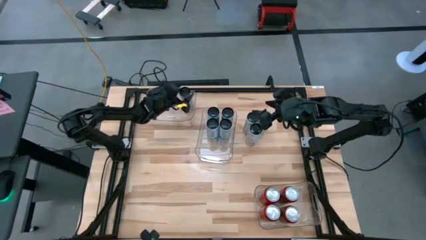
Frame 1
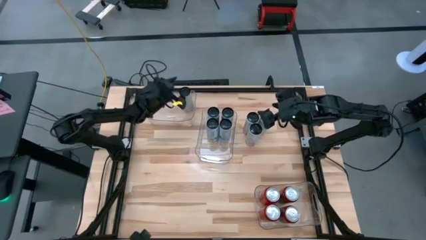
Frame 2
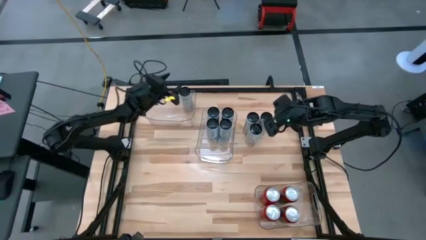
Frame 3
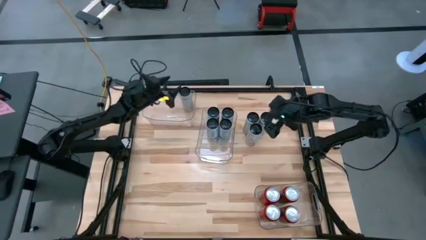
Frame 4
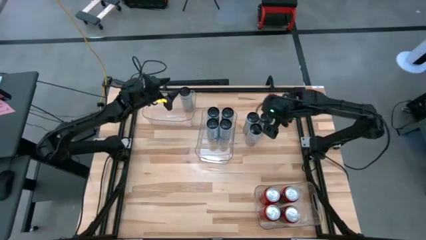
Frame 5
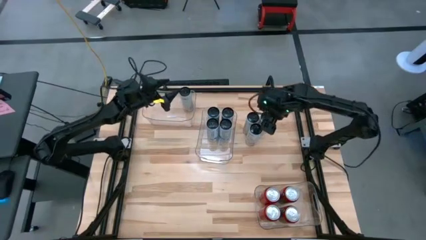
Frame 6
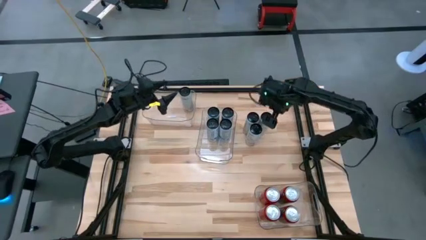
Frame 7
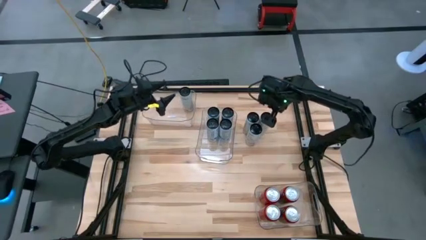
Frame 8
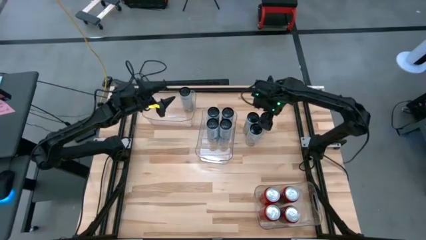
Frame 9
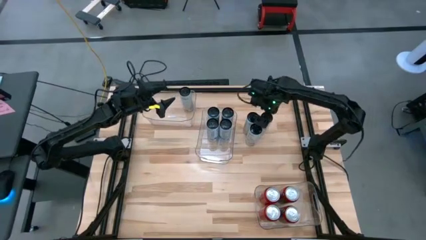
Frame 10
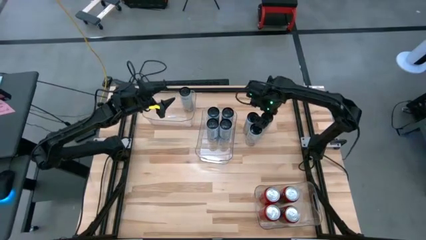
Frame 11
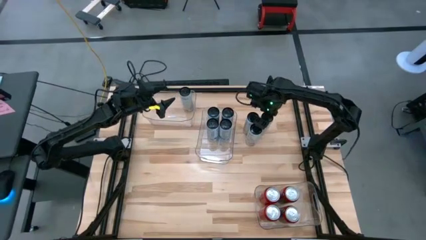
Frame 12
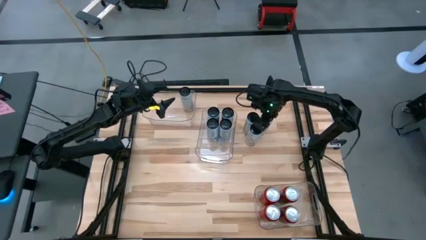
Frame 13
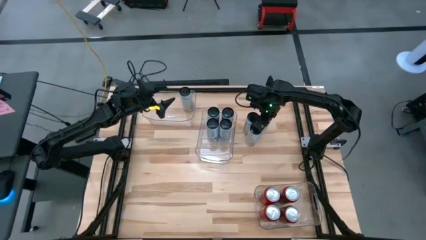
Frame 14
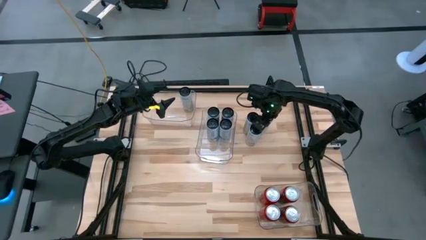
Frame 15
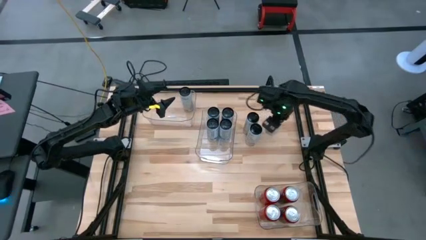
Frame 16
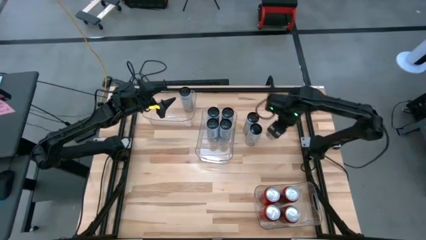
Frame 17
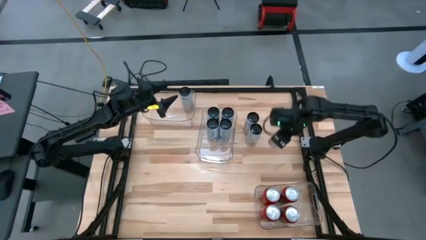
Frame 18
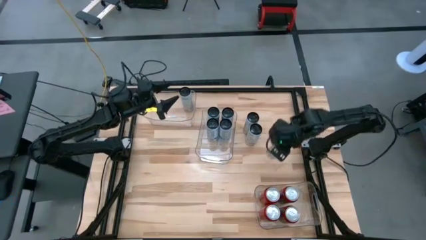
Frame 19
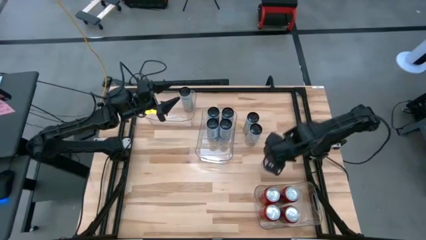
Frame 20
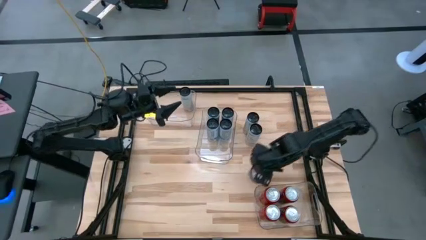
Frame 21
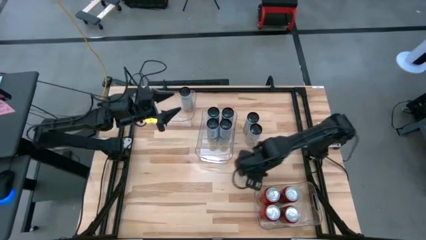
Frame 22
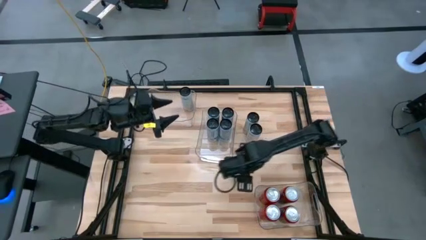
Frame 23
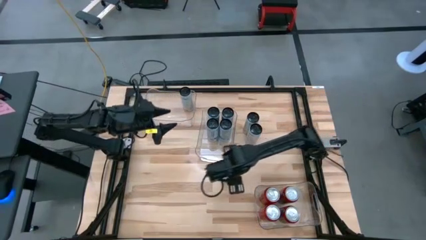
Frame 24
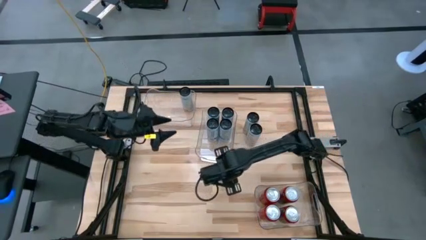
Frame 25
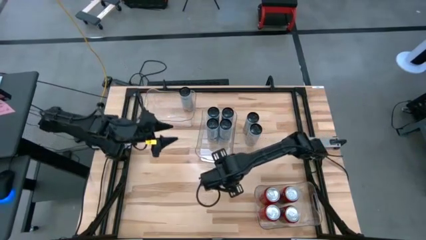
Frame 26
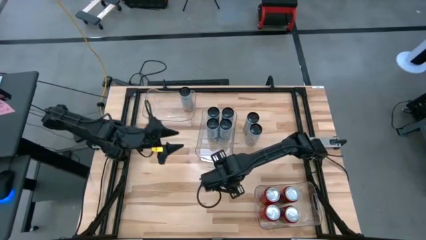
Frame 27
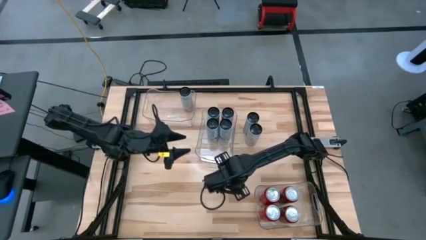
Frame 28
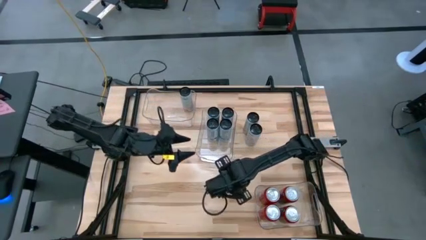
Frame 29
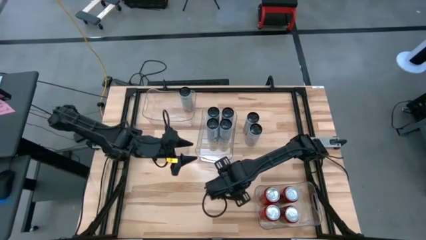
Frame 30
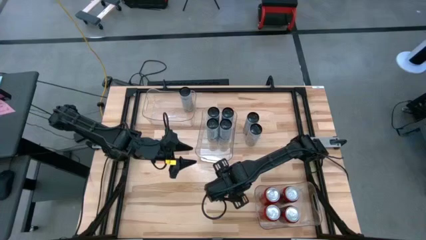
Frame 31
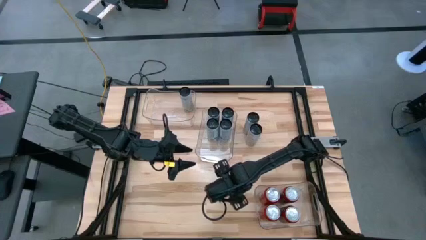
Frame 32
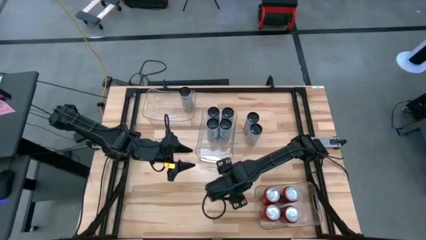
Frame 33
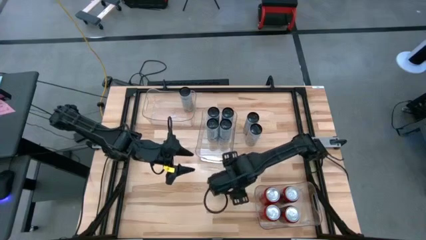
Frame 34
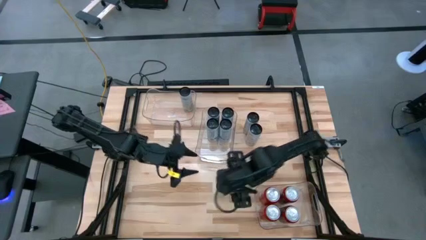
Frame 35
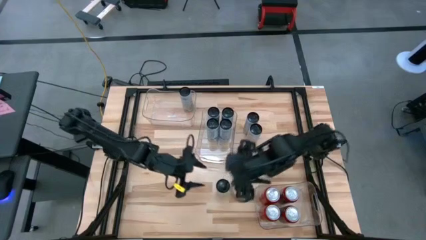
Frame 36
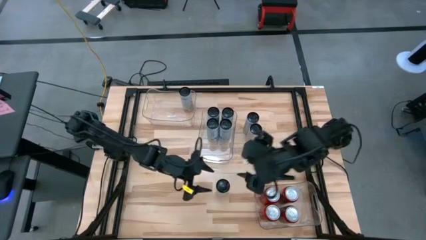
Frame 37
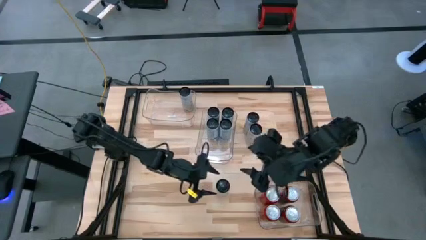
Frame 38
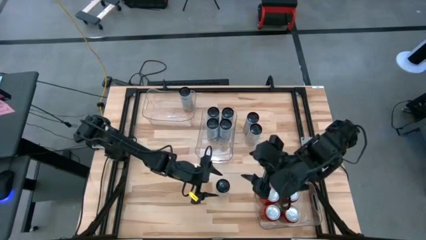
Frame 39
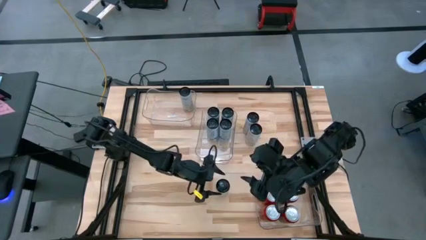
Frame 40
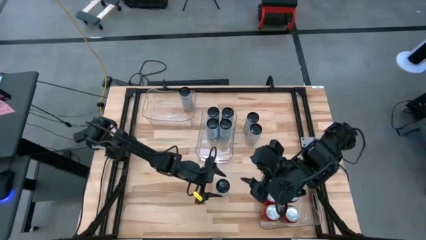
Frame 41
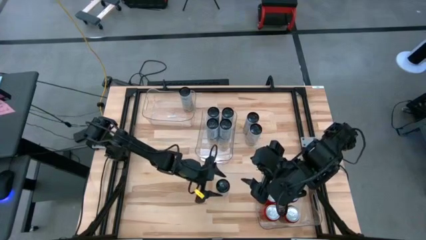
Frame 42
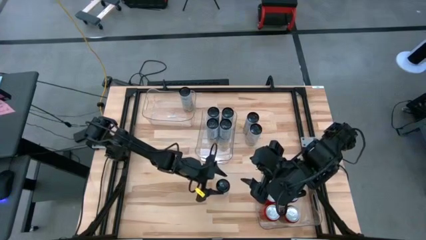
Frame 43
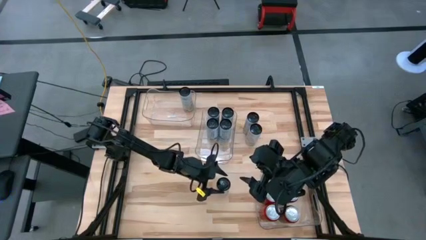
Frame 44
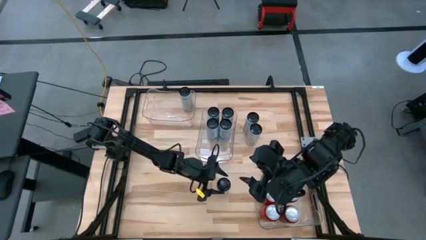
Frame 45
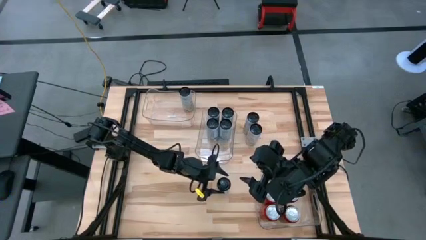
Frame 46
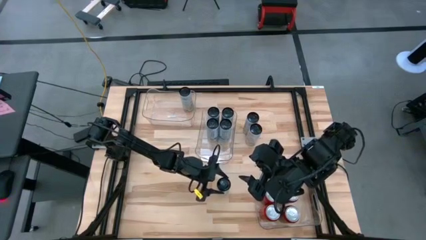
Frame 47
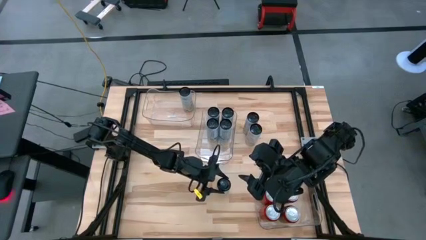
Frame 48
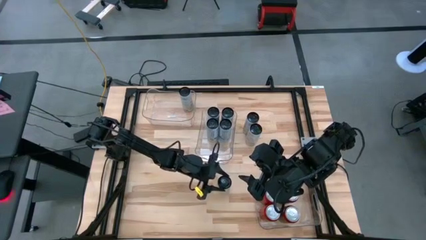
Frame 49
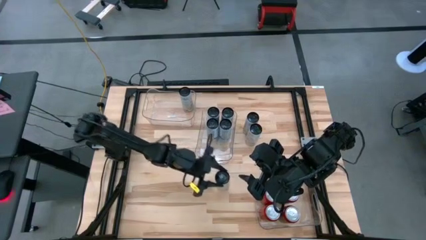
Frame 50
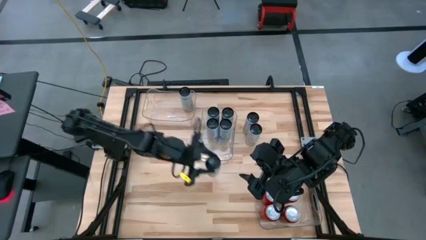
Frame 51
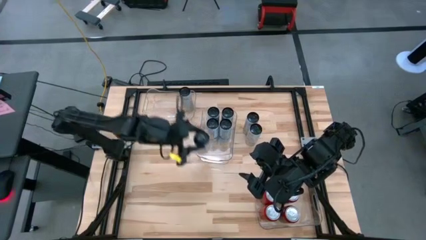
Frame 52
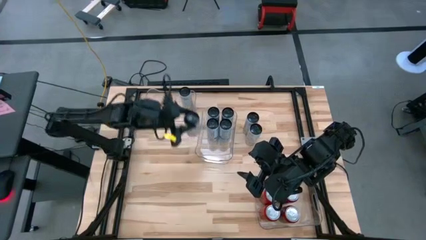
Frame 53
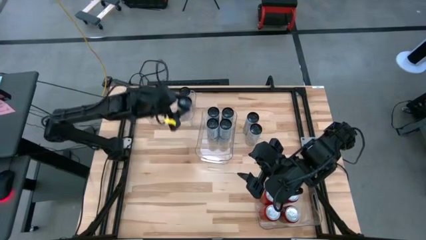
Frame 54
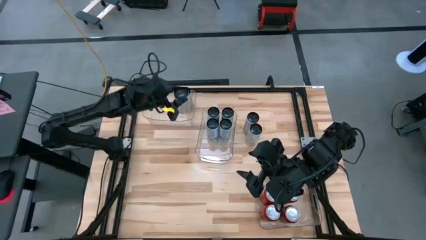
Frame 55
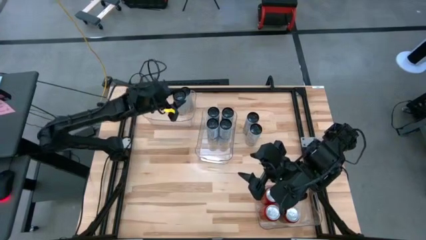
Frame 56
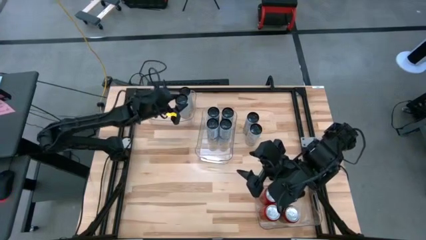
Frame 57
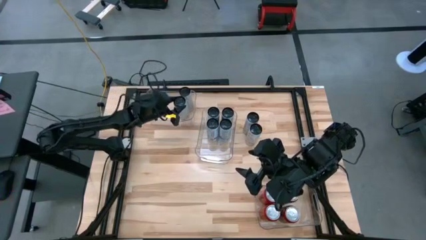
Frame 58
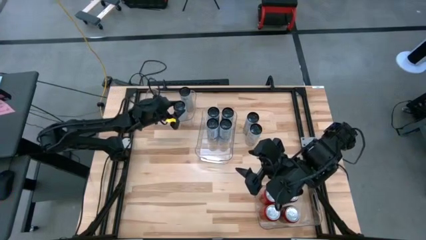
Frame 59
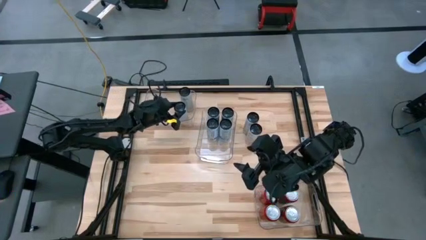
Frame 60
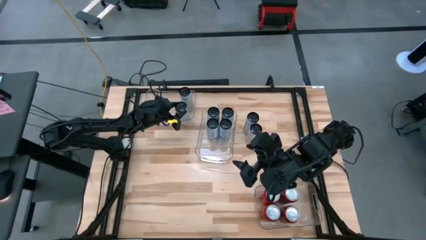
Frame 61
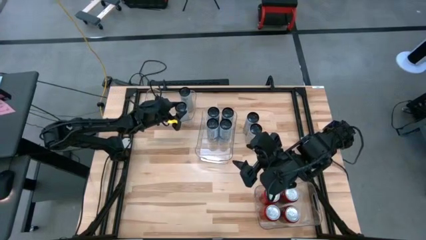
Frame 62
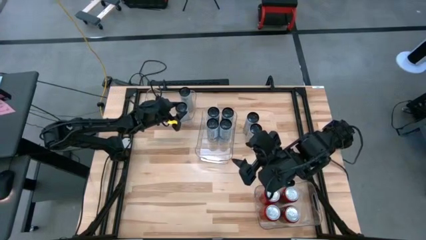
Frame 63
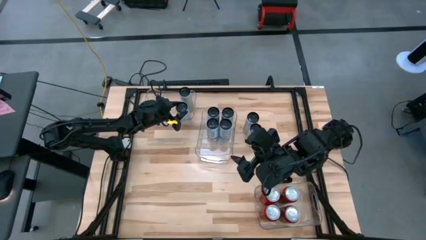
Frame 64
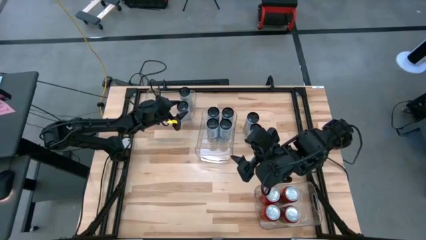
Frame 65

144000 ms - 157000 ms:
Task: Sort soda cans
Put the white yellow soda can into the top transparent bin
